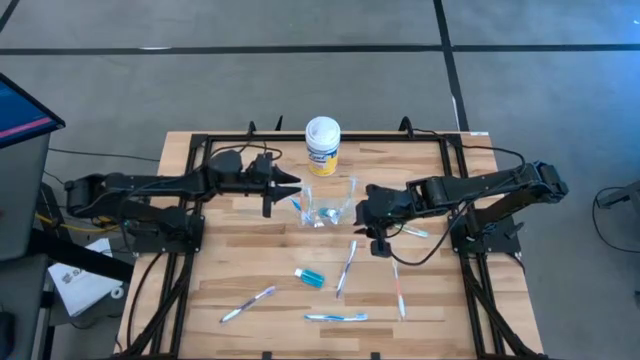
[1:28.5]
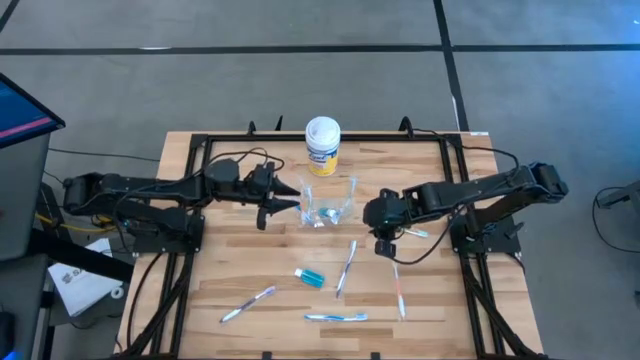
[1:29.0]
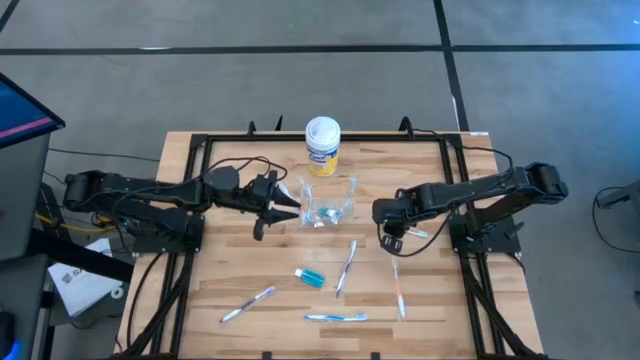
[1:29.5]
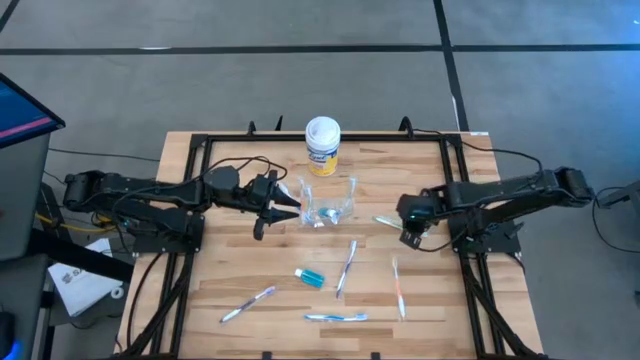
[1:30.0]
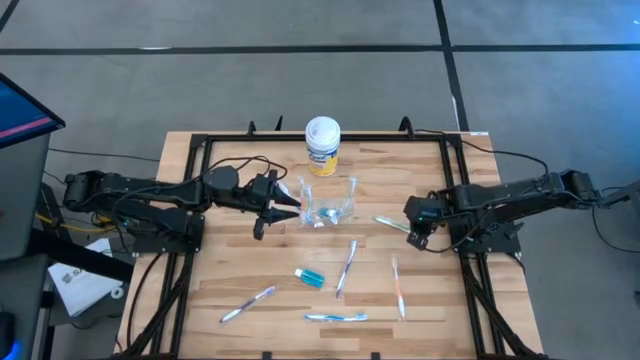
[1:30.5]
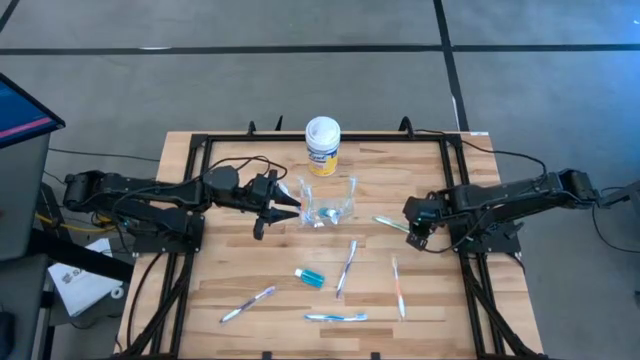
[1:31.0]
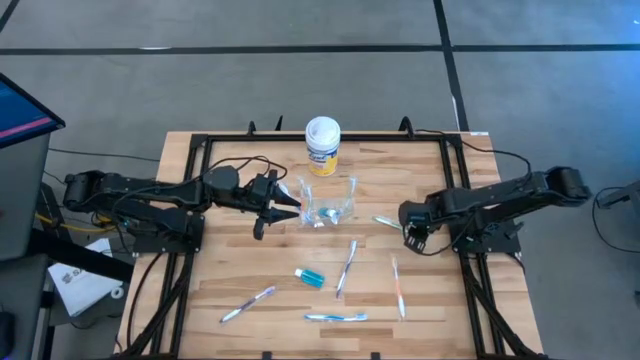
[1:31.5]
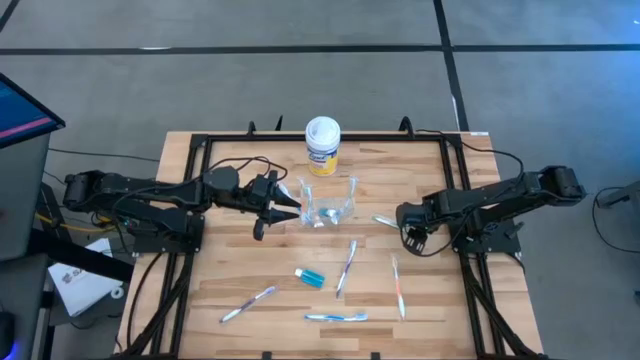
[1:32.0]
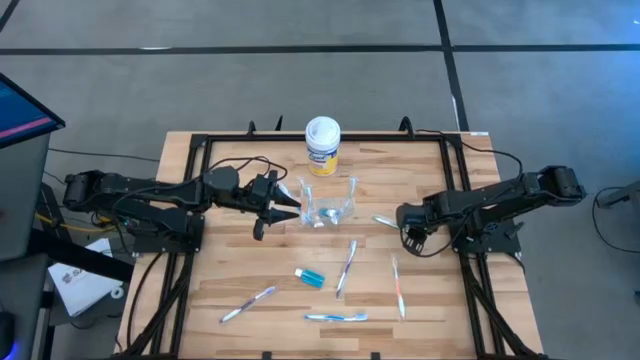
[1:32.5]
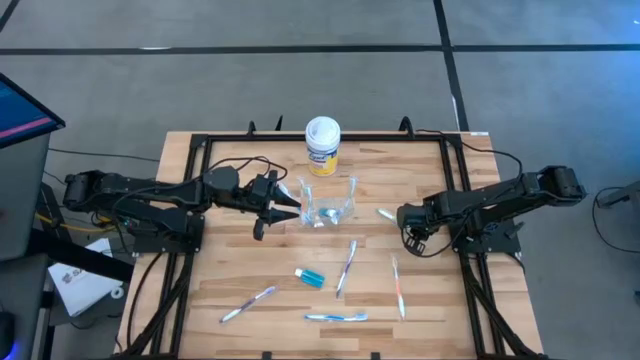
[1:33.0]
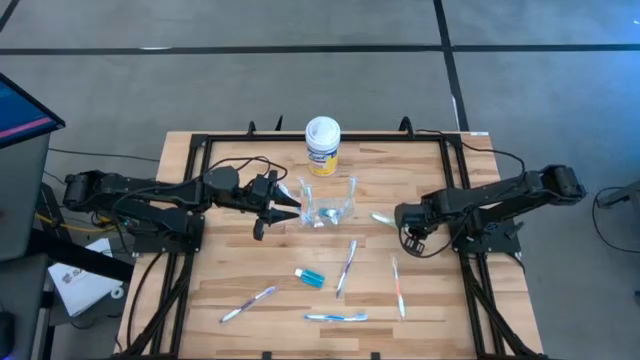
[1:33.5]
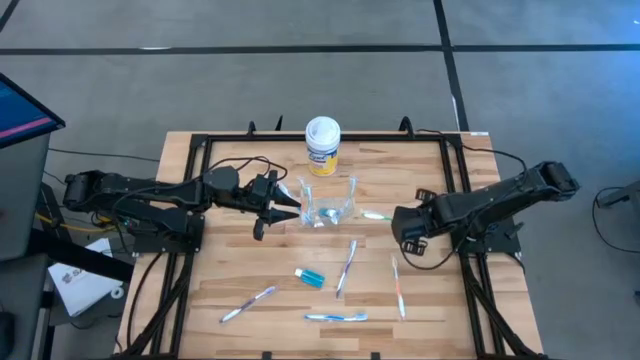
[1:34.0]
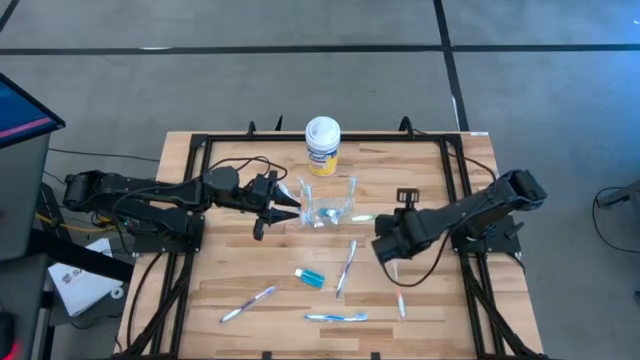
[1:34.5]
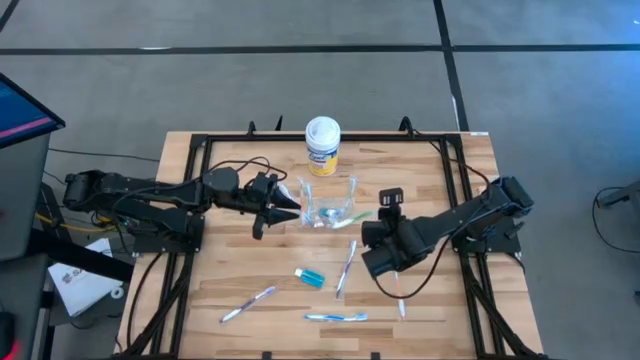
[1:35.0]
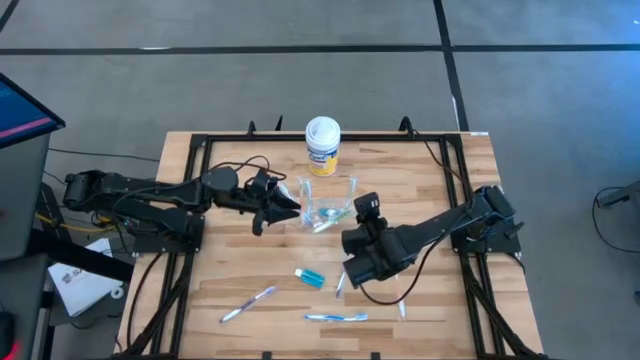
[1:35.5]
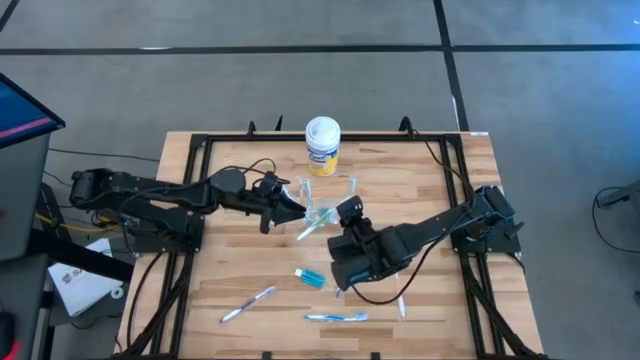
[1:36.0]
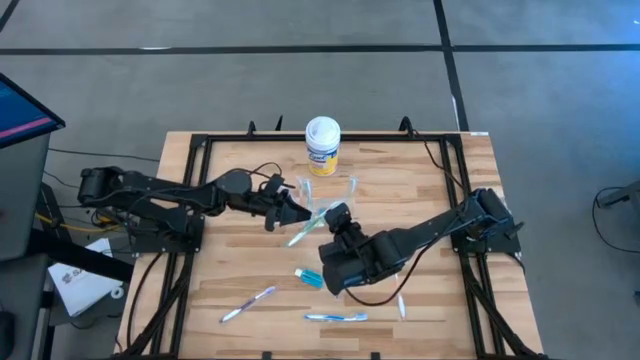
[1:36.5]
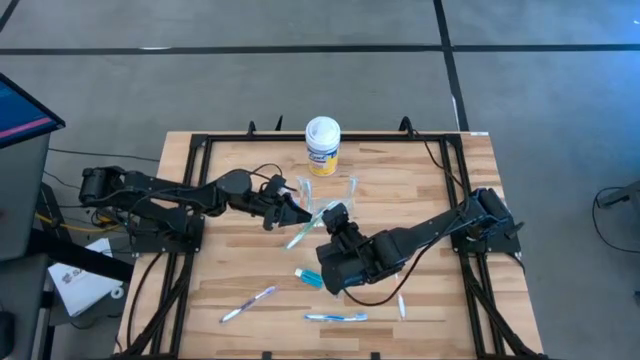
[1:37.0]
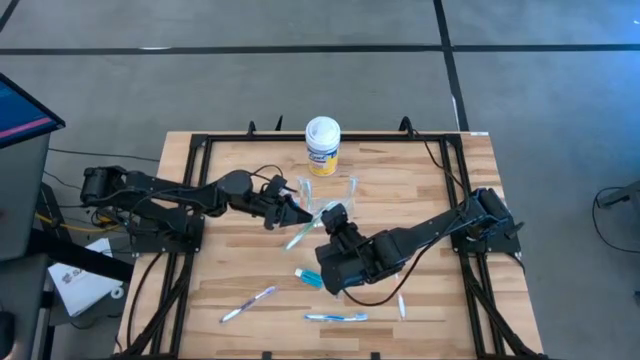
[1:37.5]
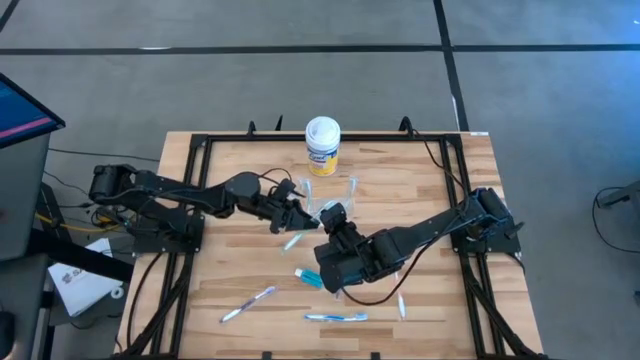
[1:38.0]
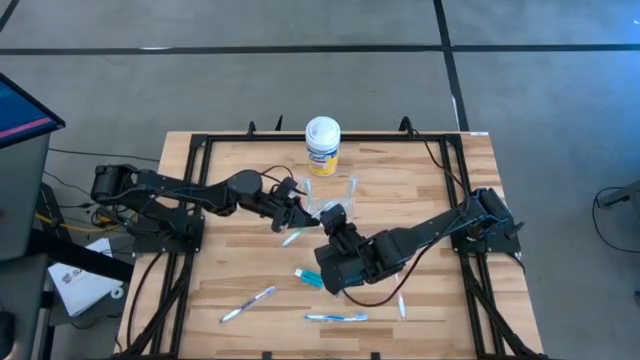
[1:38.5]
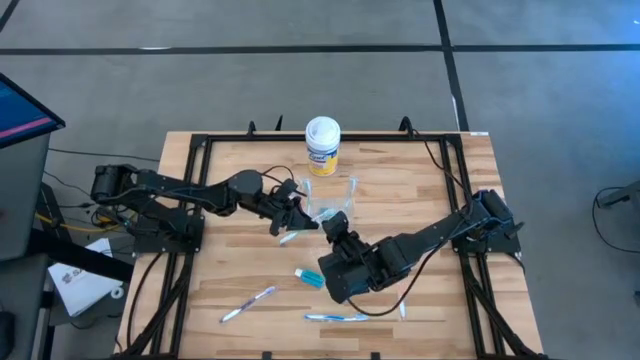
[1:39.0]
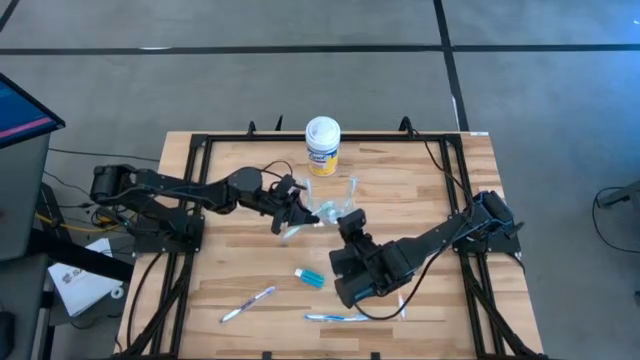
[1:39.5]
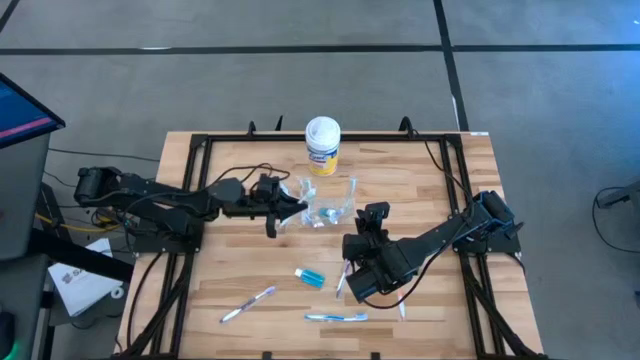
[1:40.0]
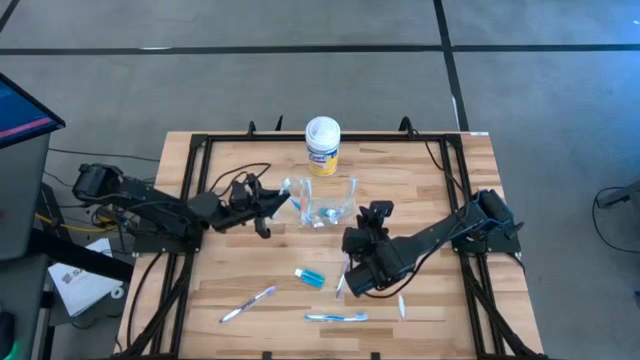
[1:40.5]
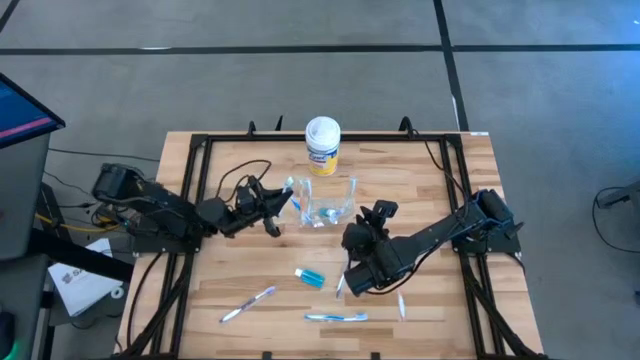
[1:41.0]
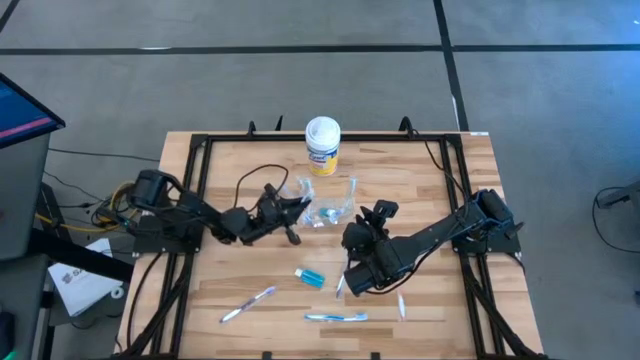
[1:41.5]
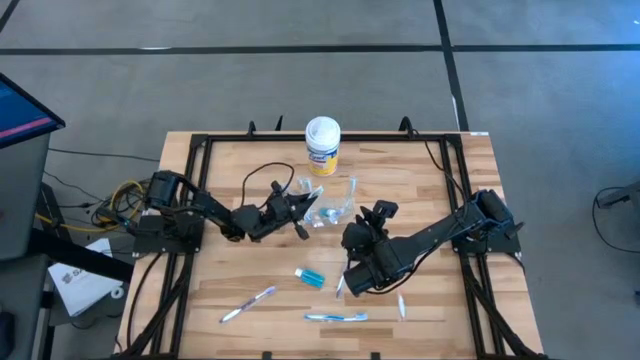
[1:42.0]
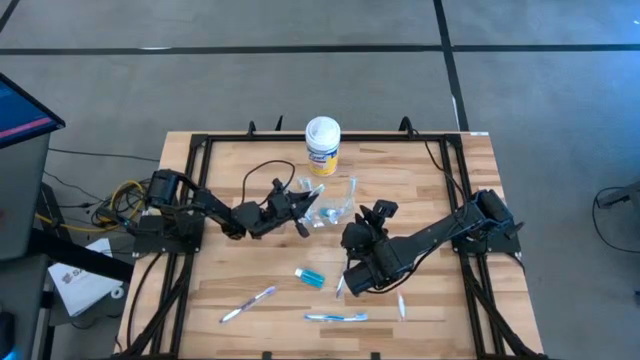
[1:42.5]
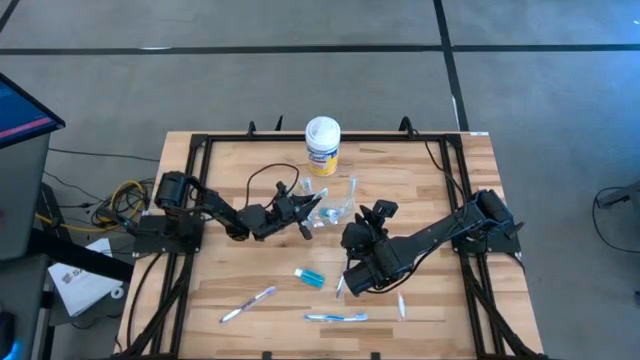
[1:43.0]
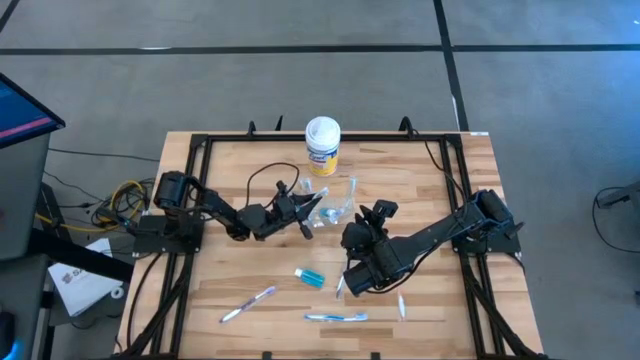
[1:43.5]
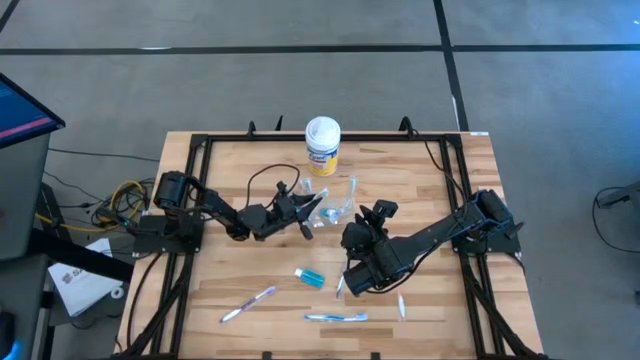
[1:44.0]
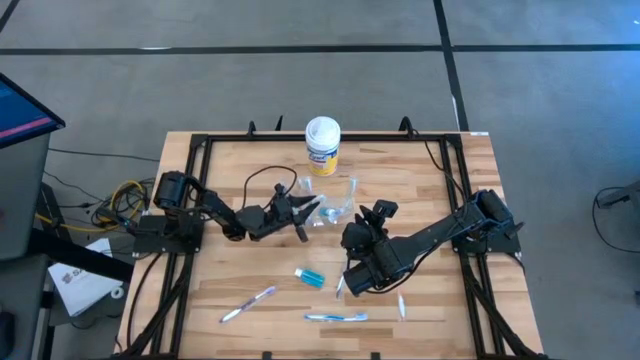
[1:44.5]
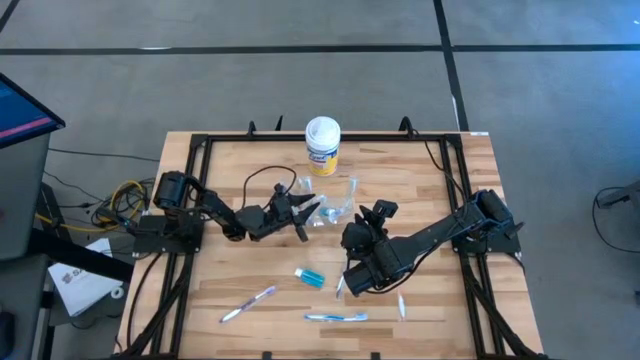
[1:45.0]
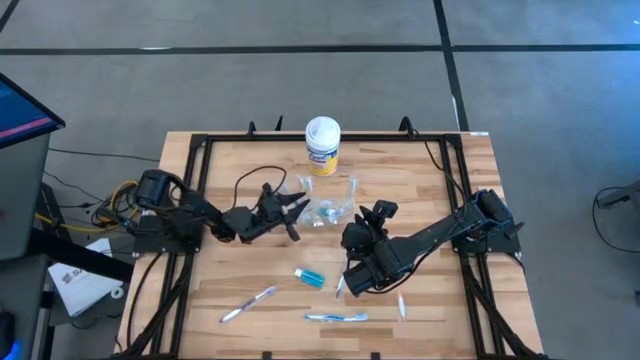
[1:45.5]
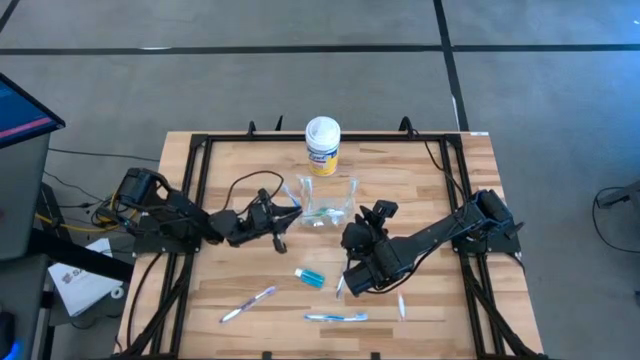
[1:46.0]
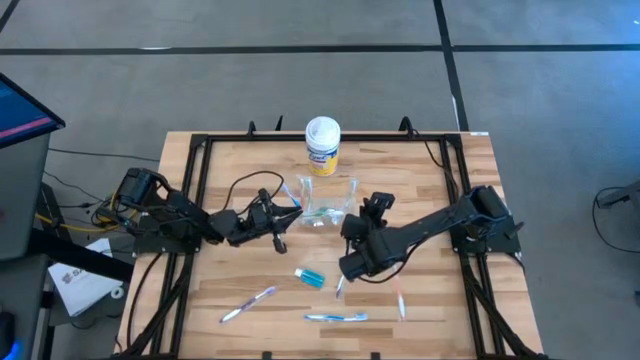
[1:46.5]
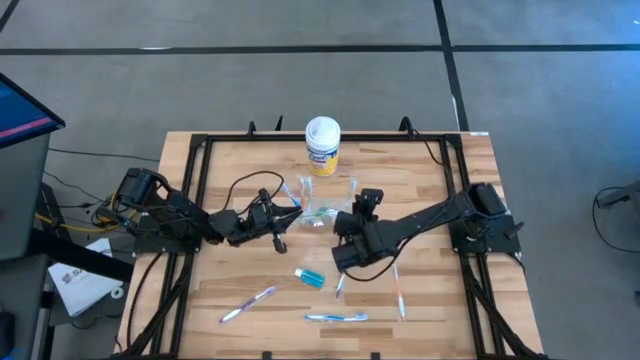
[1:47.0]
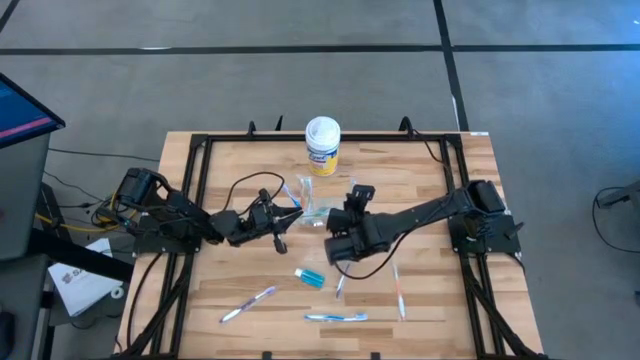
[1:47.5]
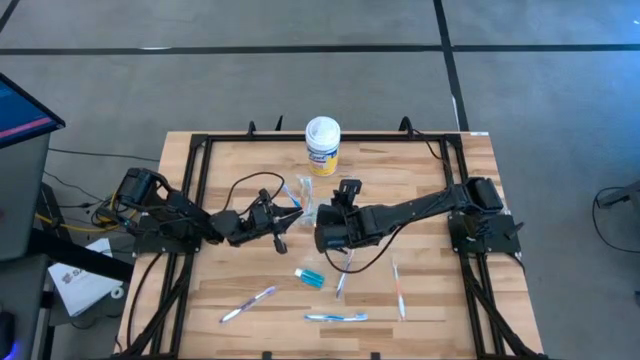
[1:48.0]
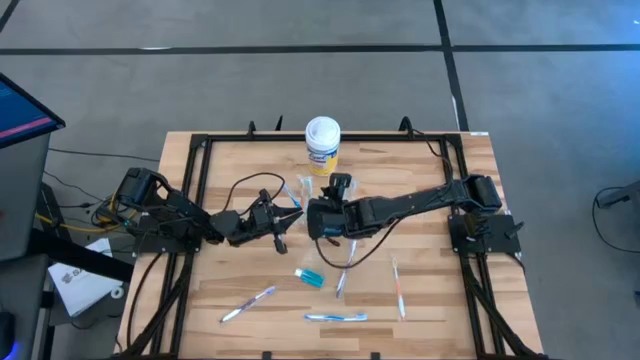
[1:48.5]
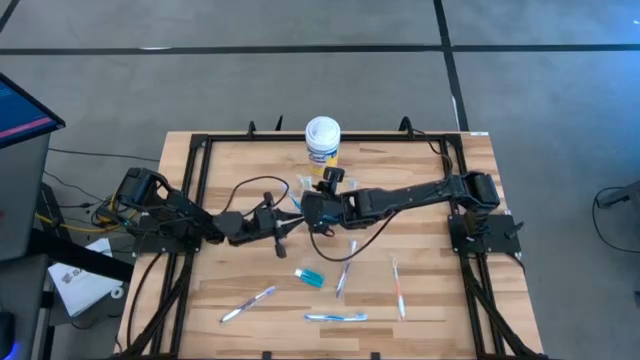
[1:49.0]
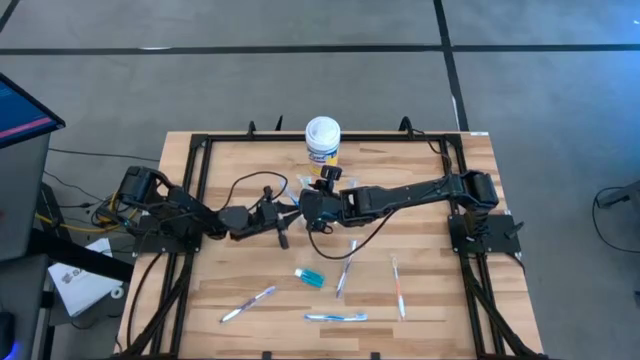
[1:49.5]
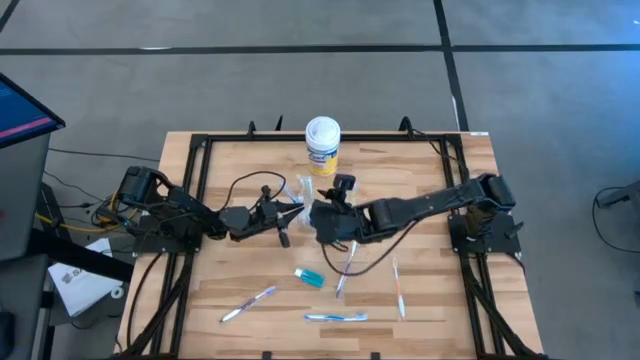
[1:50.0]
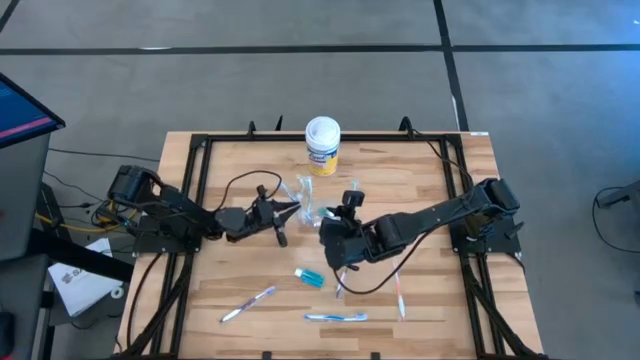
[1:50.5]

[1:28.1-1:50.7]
Task: Pick & Place toothbrushing station
Put the green toothbrush into the transparent organizer

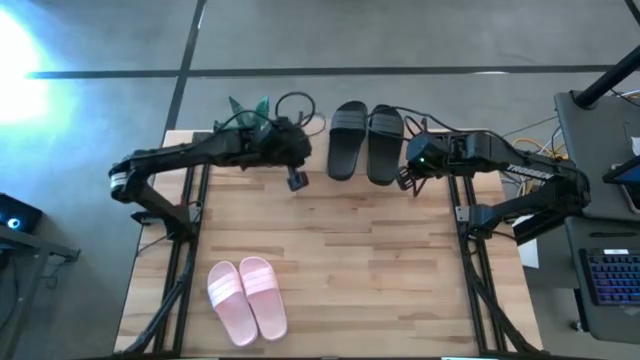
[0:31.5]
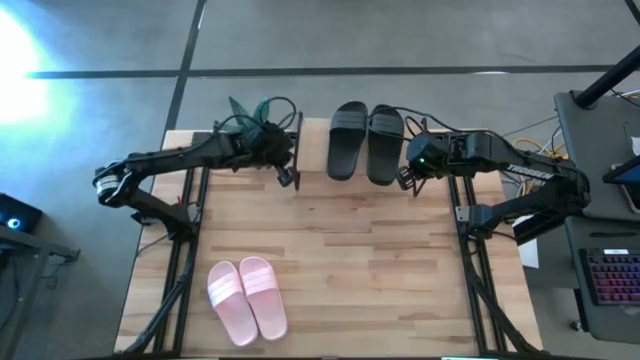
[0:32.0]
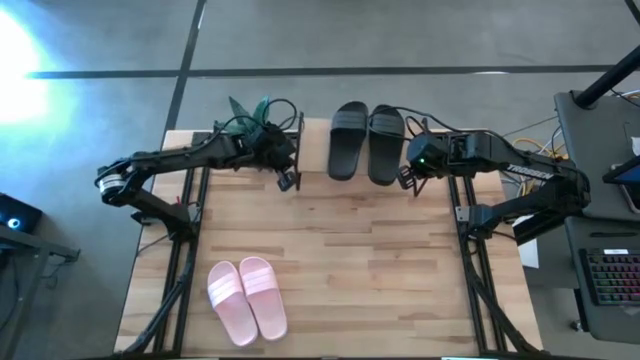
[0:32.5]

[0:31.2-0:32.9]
Task: Pick and place slides into the shelf
Adjust the shelf
